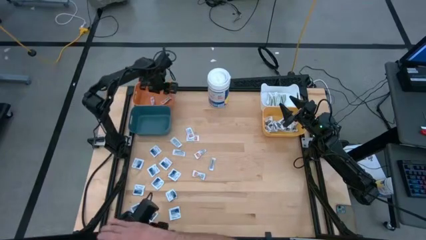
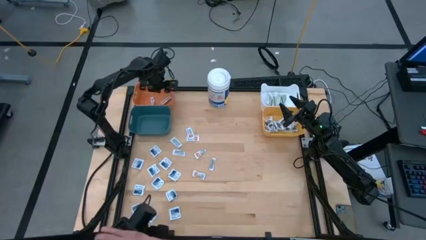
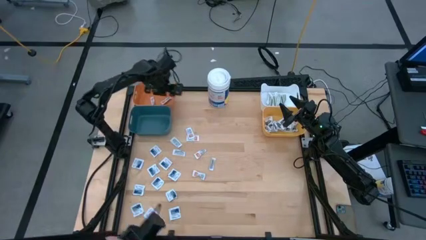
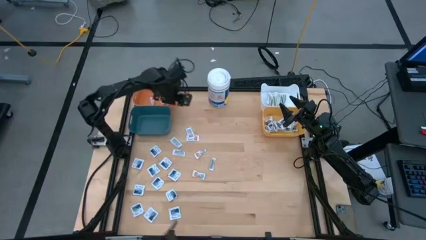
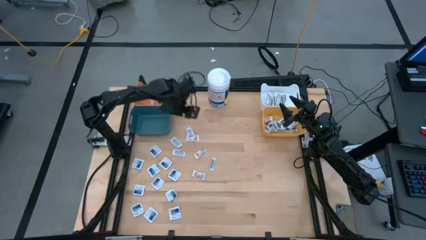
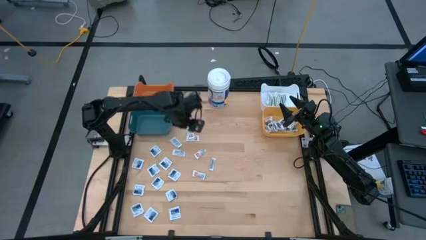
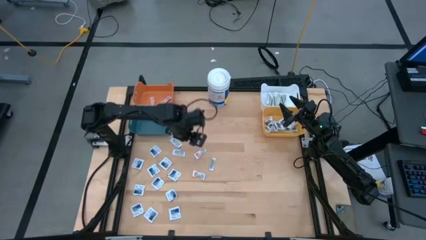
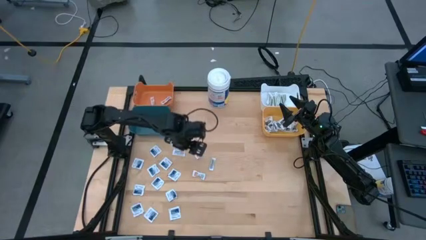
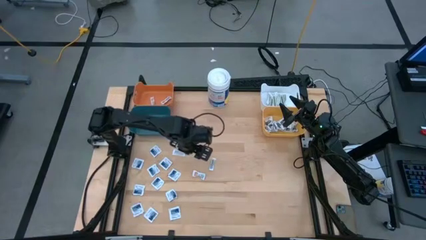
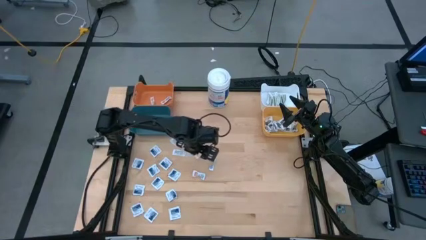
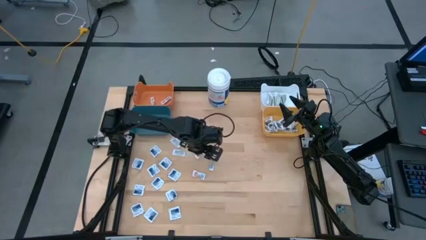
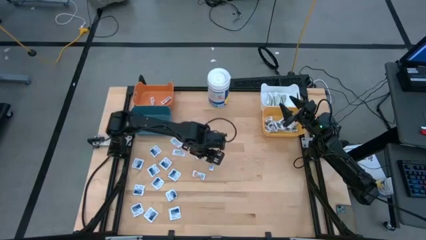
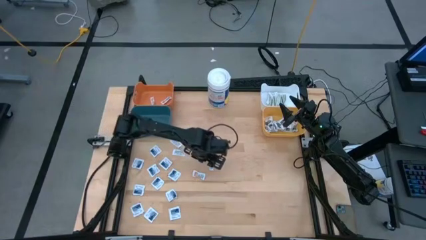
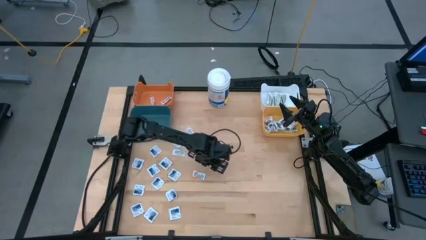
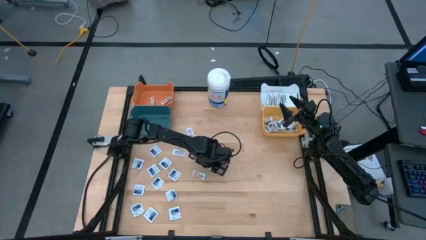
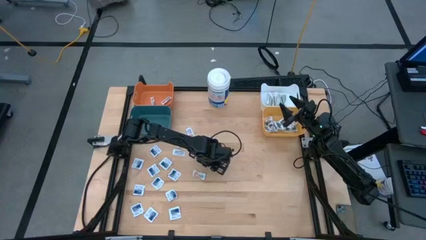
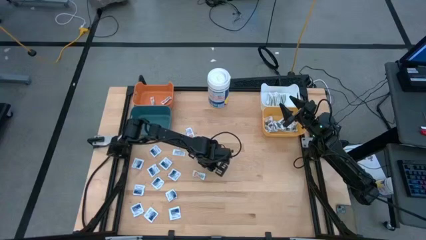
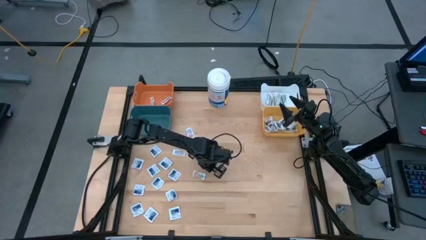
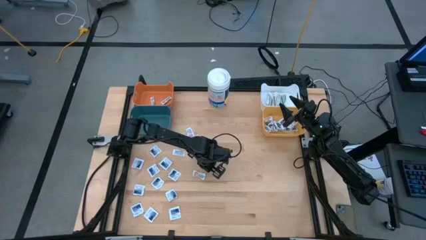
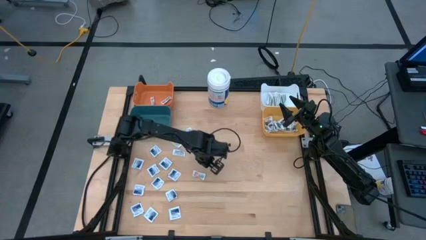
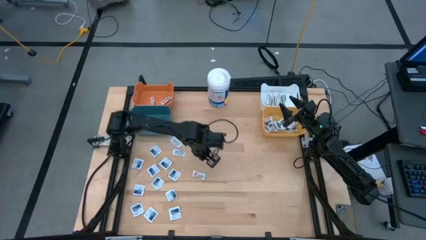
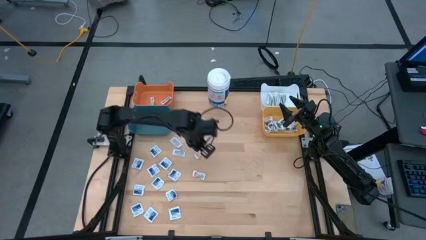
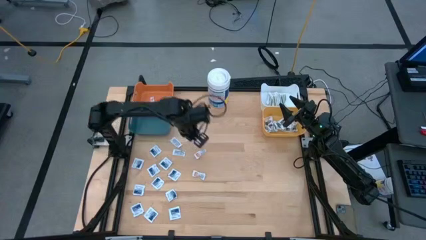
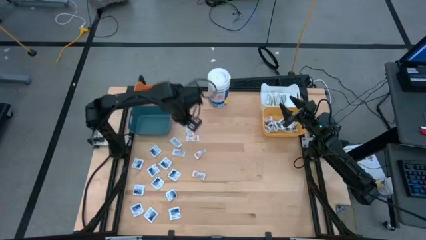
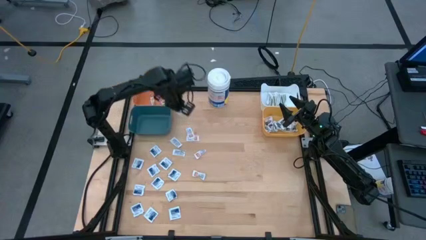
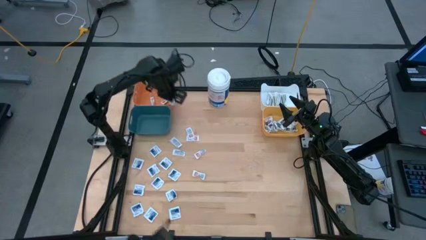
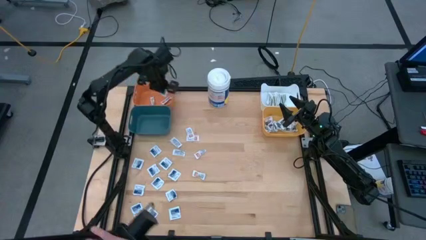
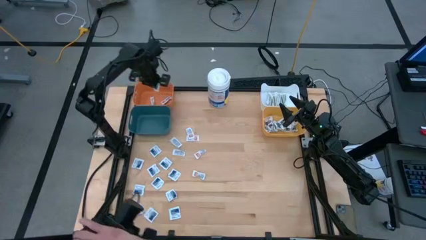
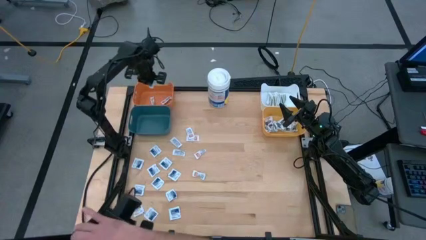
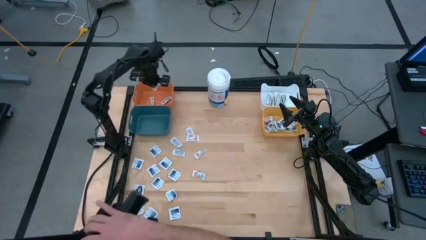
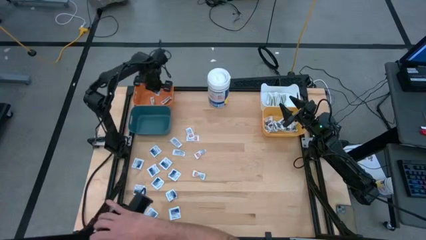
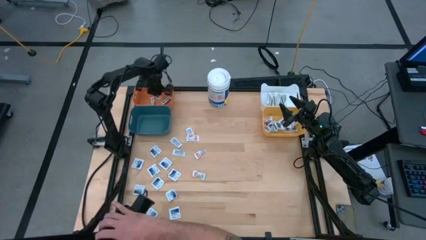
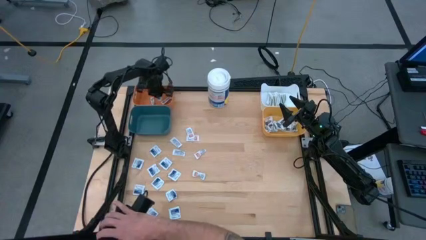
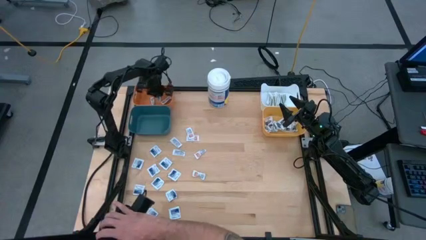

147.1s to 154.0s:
Task: Pick & Place First Aid Supplies
Put the orange pad into the orange bin

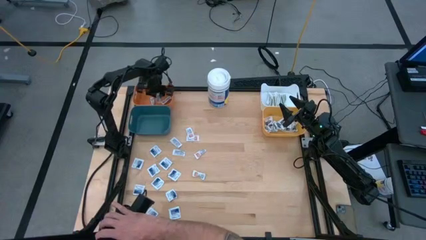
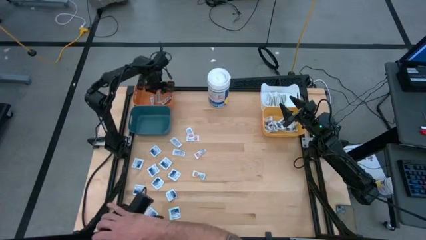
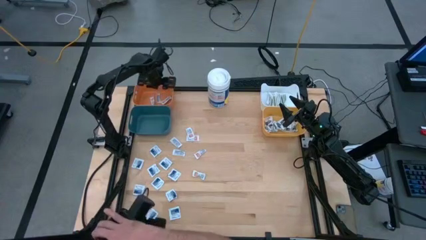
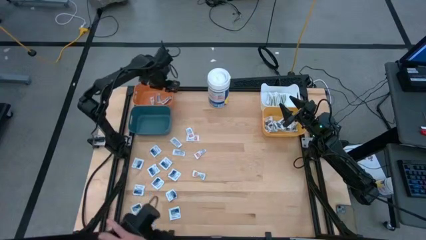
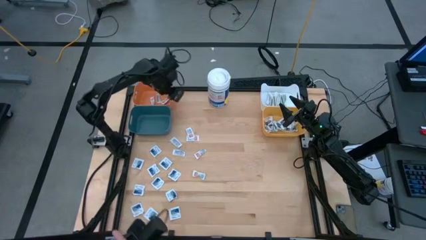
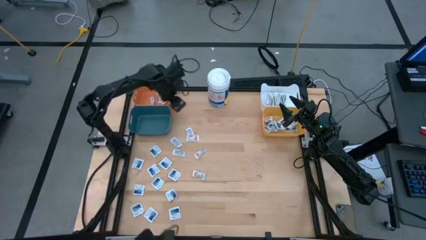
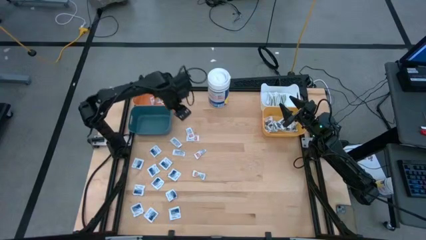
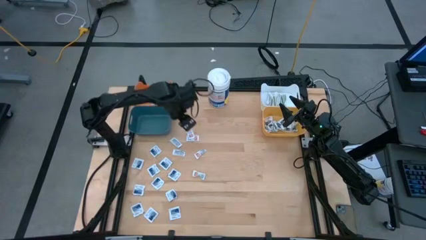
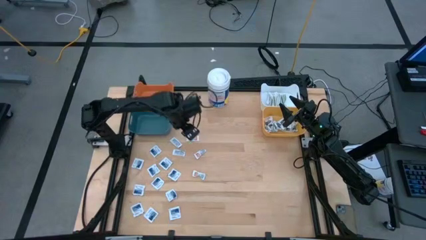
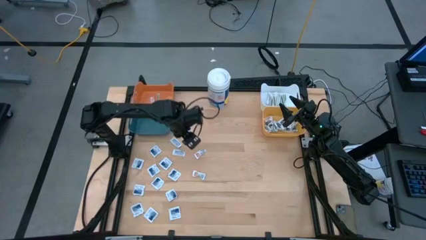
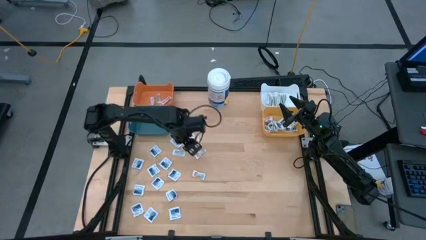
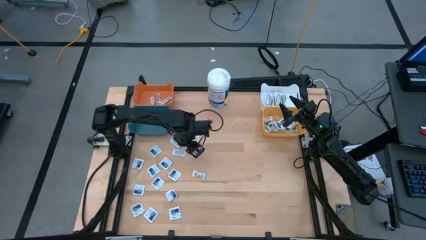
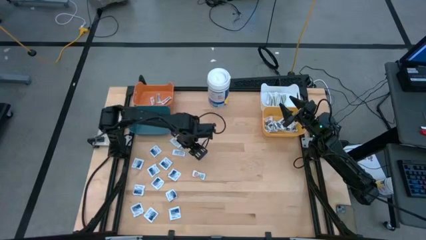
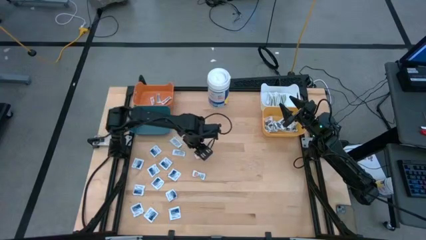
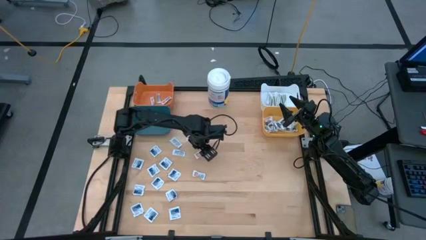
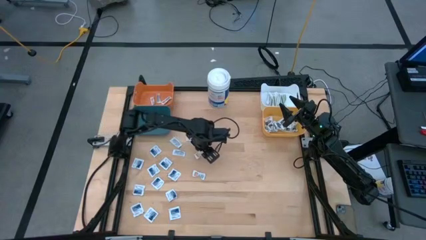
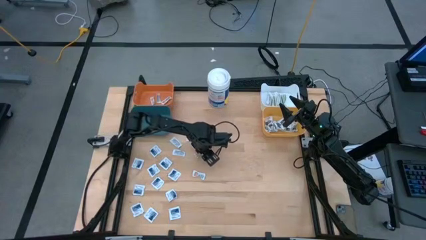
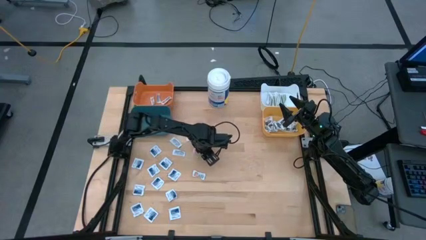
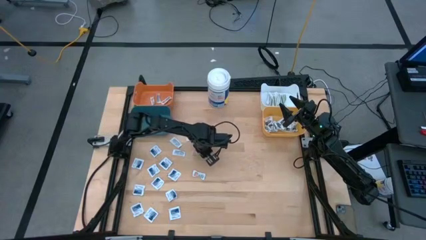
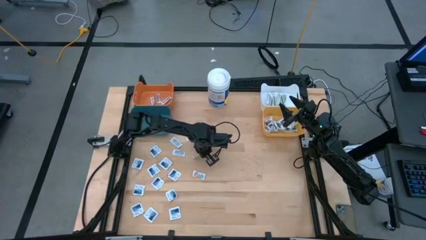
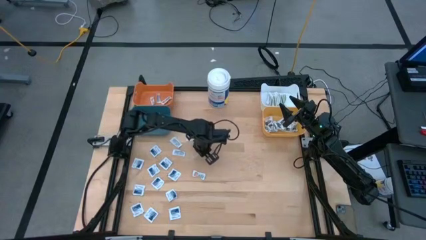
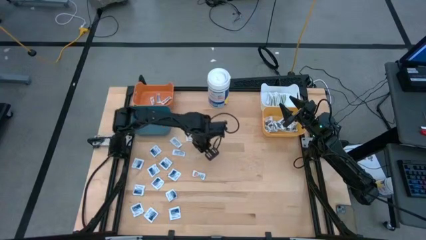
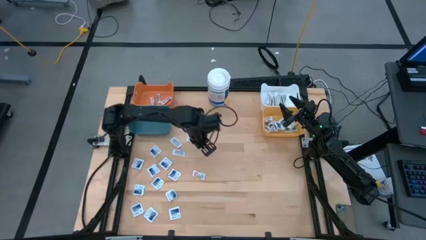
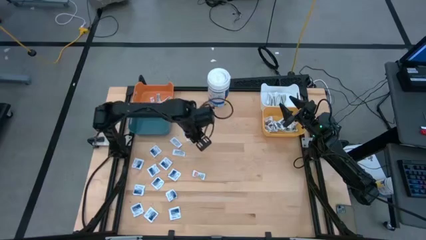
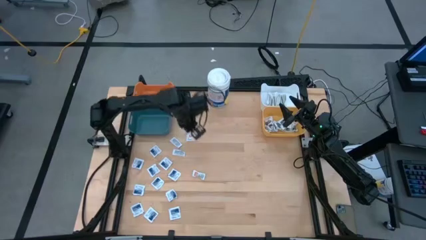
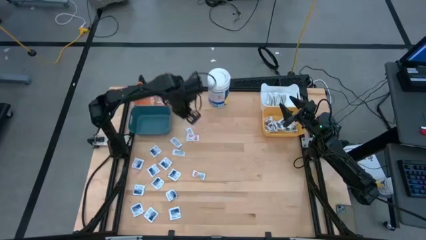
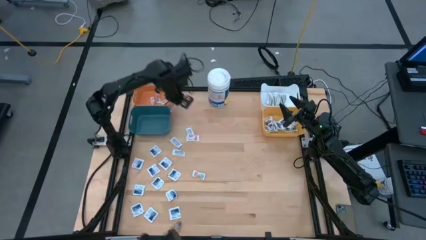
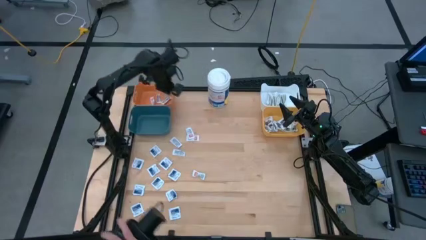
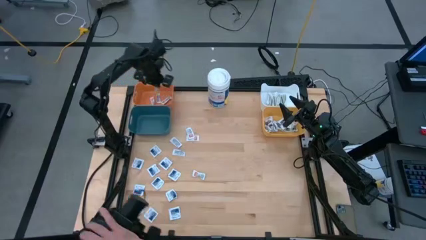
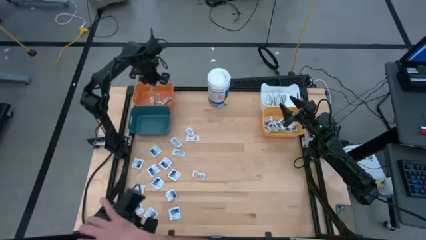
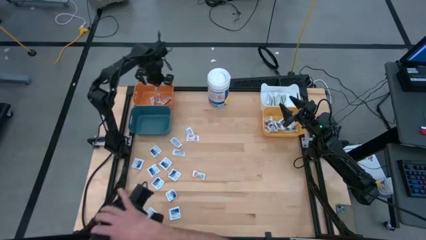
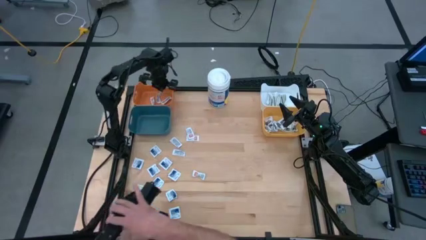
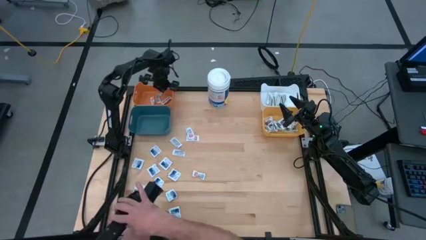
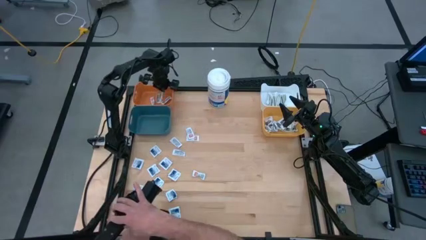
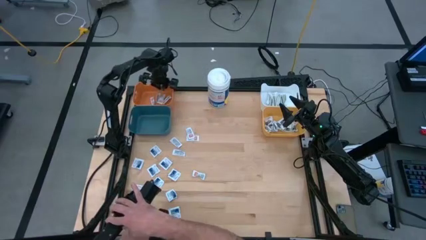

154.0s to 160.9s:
Put the orange pad into the orange bin

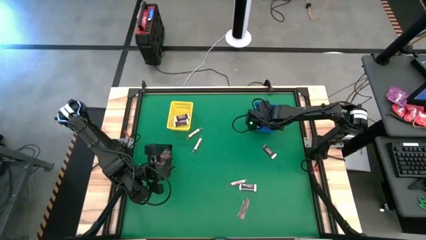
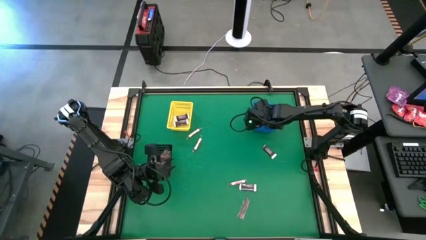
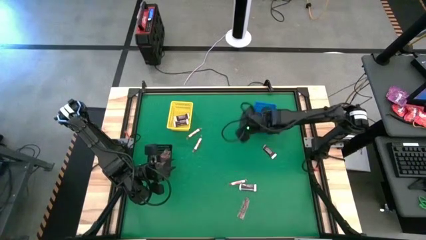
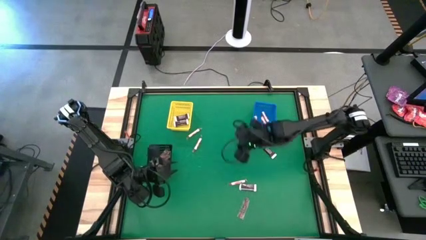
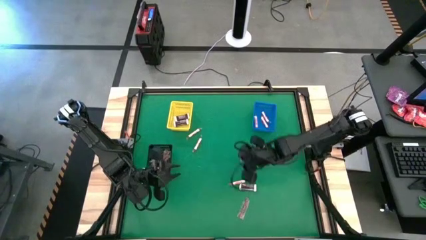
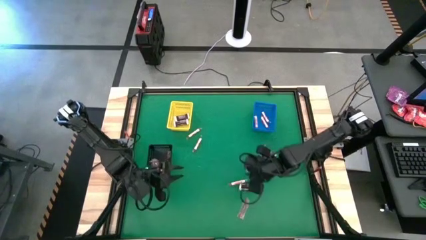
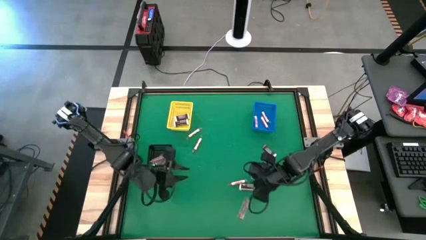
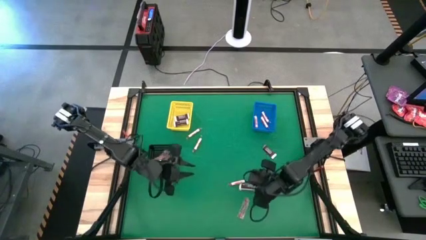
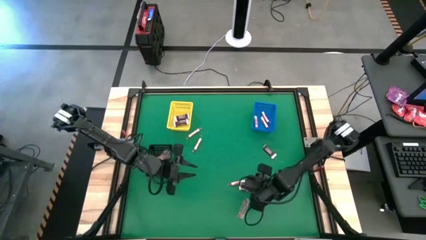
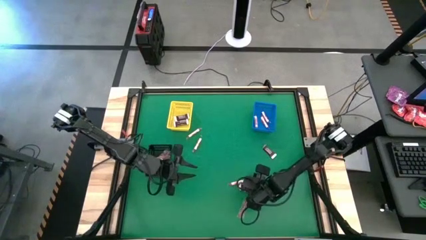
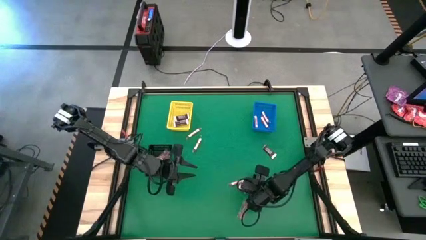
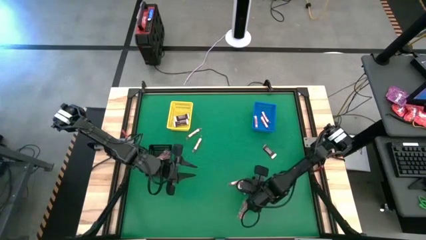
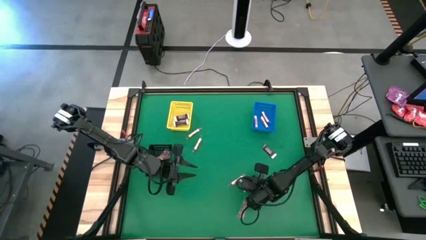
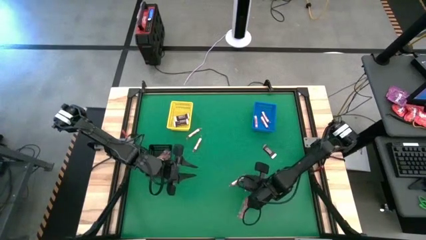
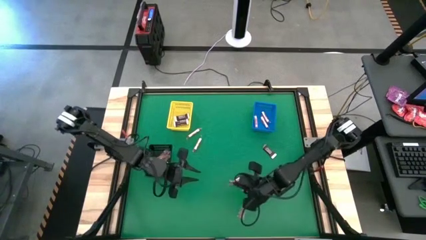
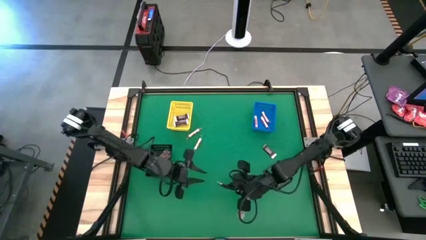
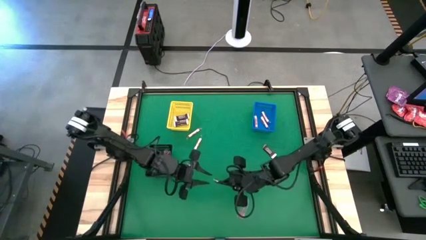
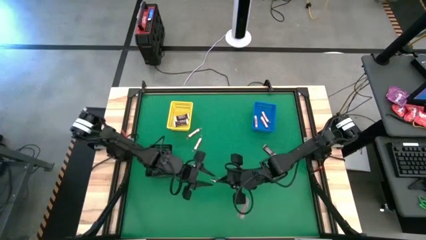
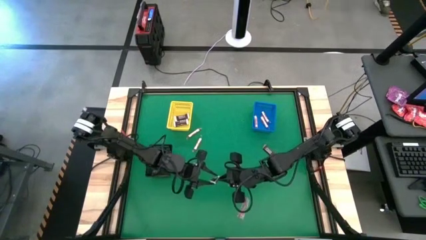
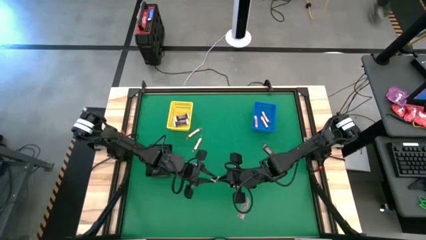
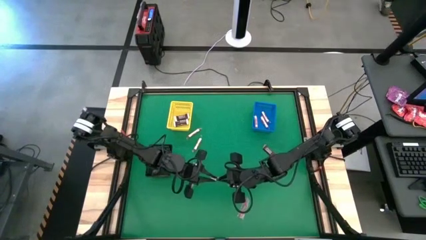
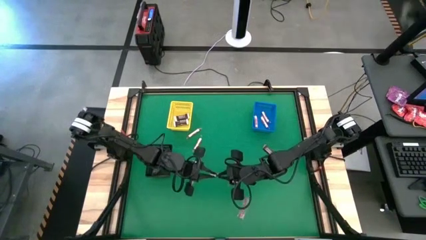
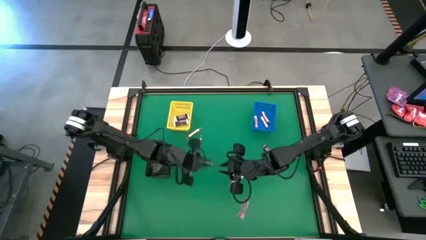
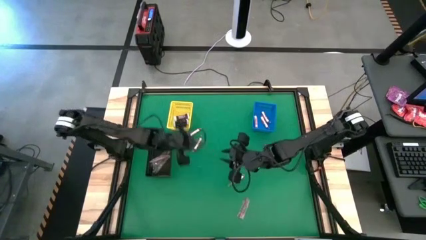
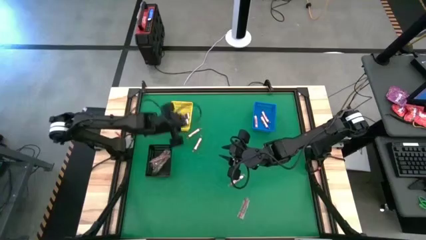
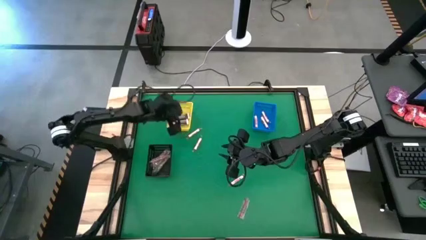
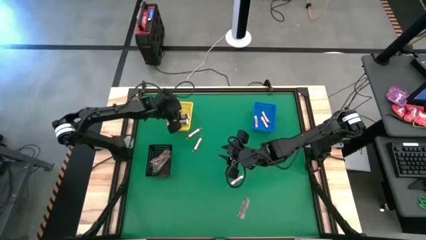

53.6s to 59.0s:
Task: Sort candy by brand, put in halloween buckets
Put the brown chocolate into the yellow bin
